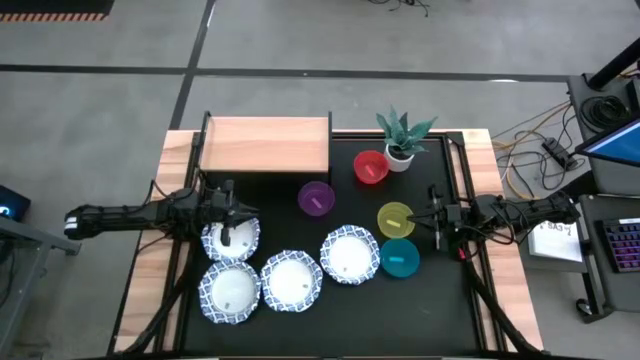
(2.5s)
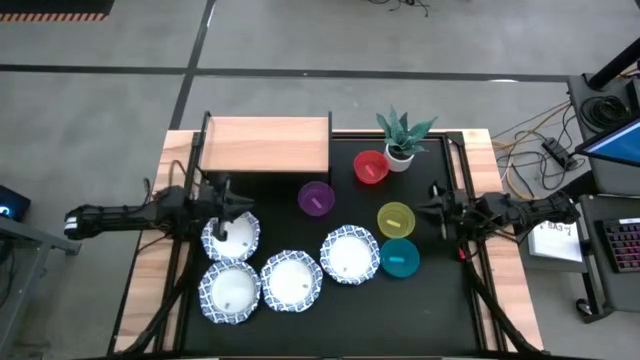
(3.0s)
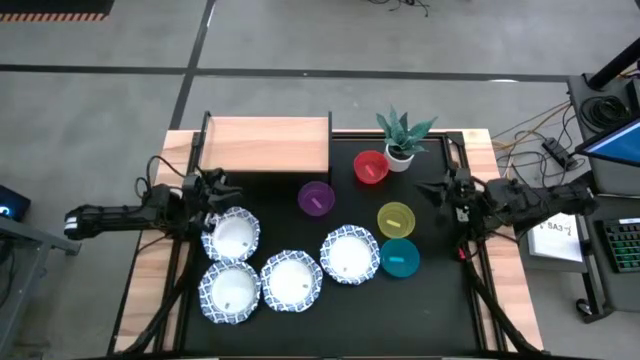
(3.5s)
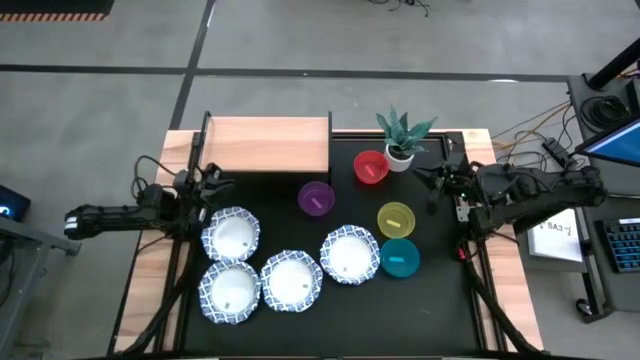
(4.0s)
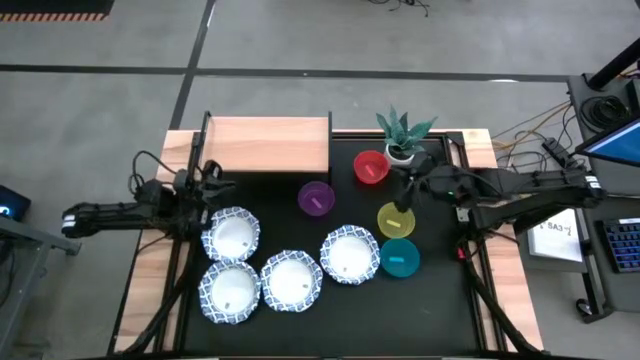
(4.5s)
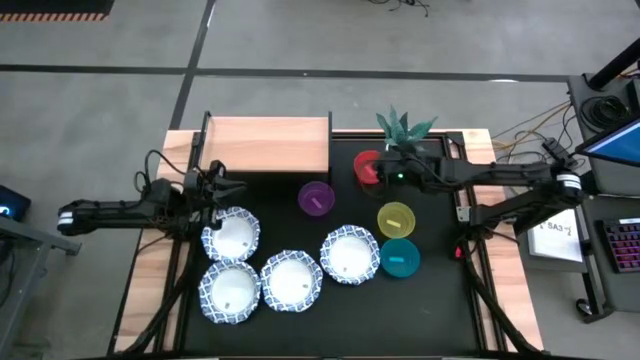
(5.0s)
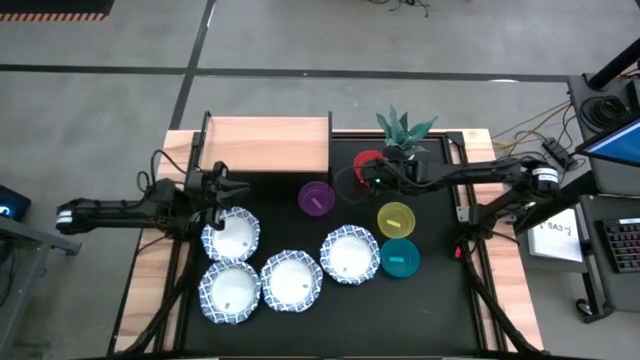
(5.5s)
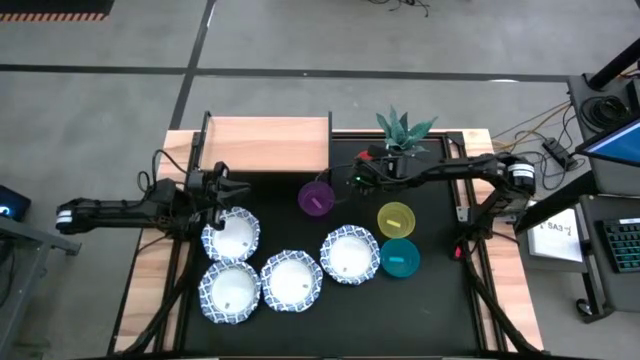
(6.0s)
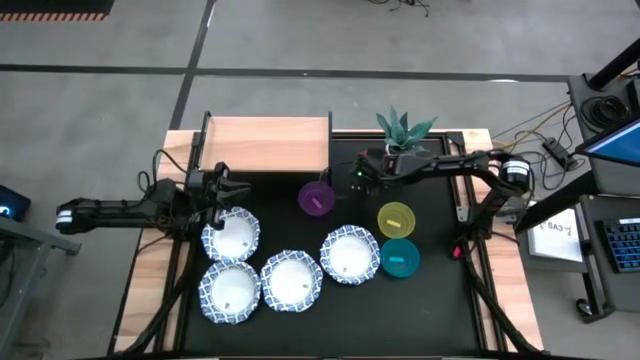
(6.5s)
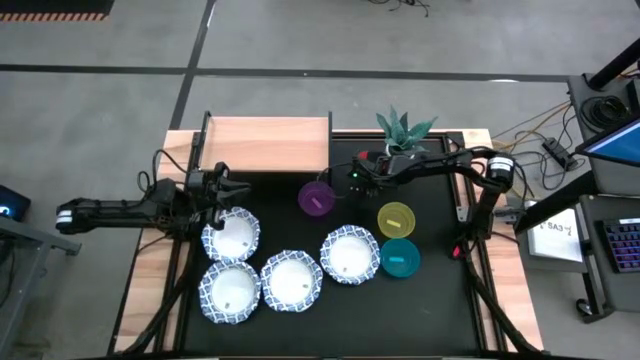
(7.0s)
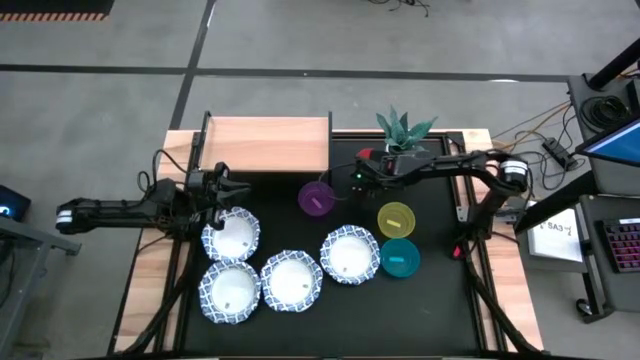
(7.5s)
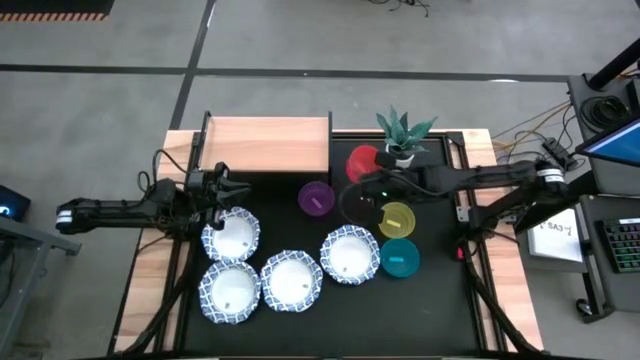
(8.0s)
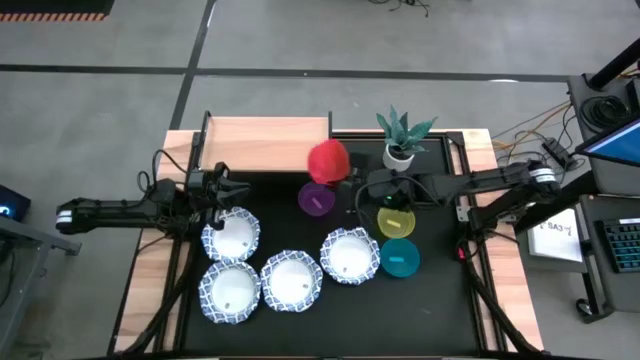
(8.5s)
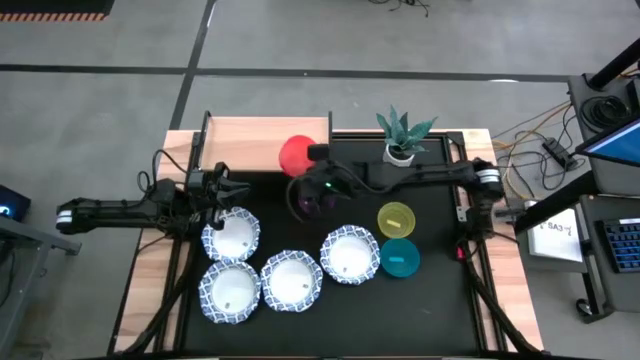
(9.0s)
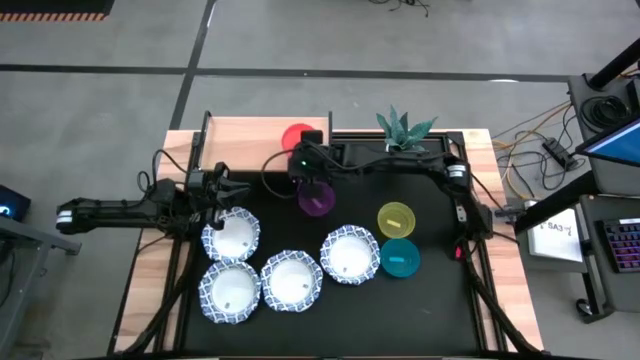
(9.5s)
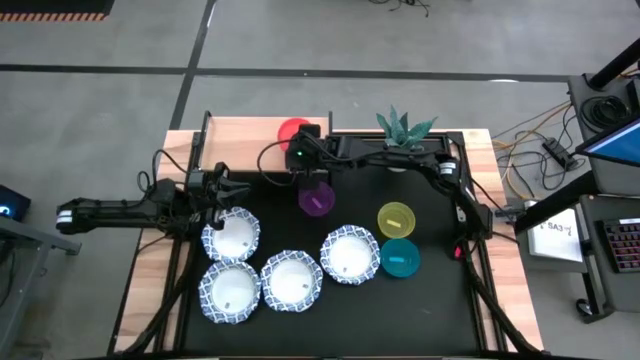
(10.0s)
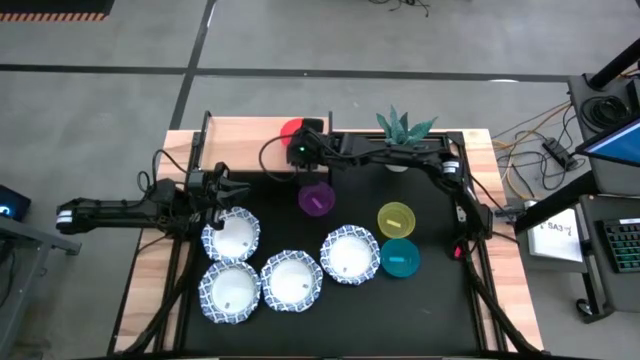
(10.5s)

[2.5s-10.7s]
Task: Place and stack bowls onto a shelf
Put the orange bowl on the shelf

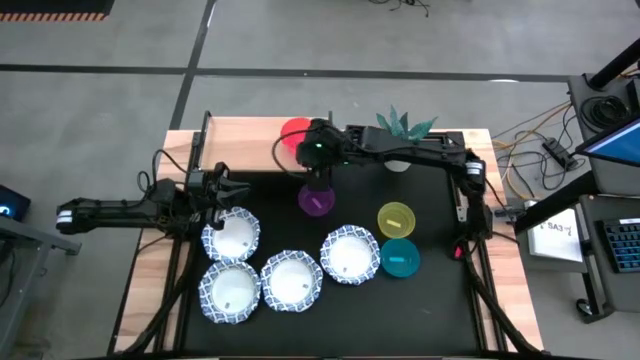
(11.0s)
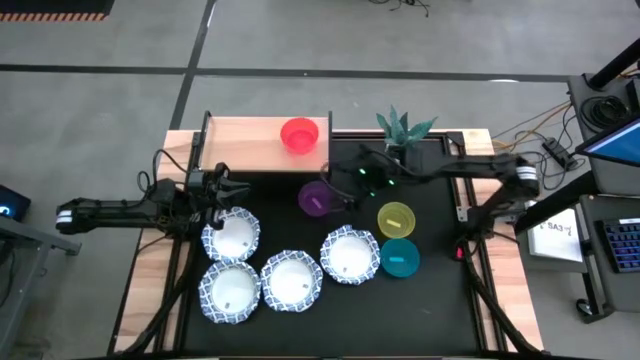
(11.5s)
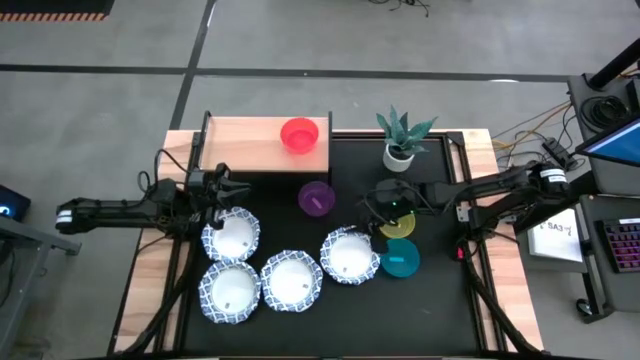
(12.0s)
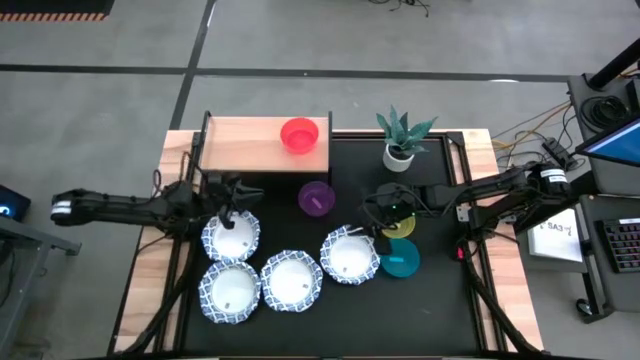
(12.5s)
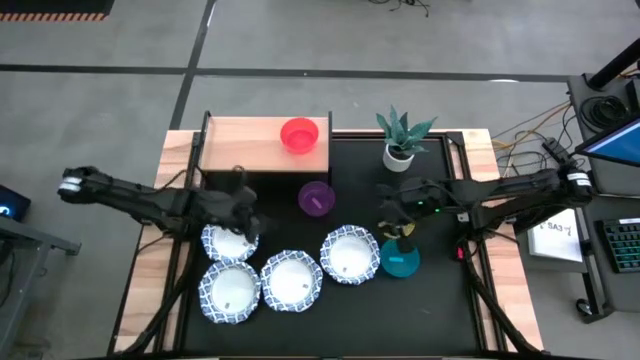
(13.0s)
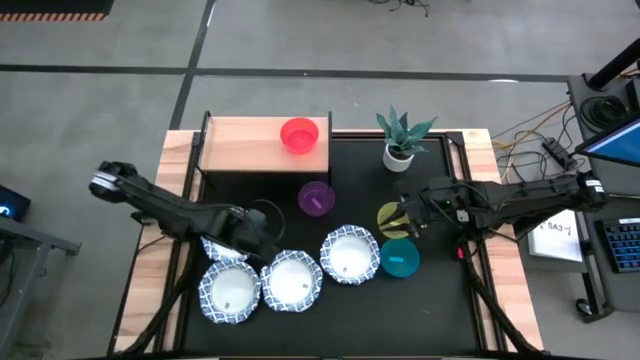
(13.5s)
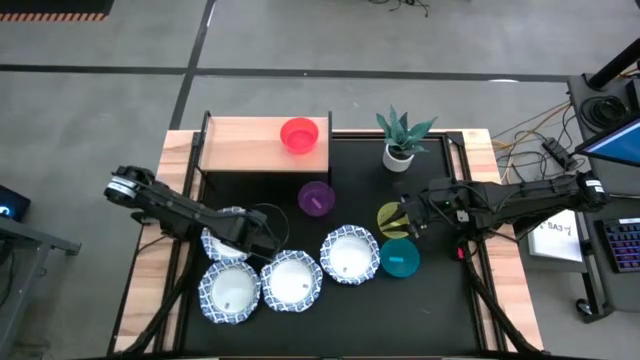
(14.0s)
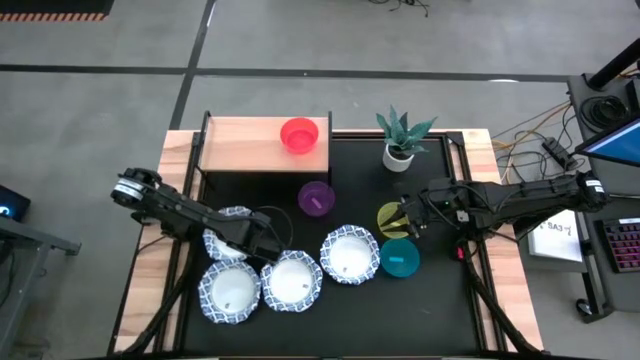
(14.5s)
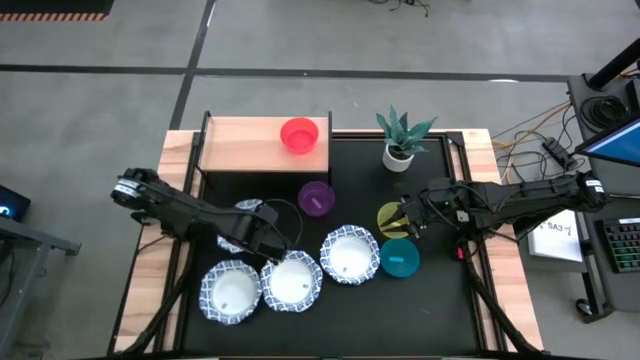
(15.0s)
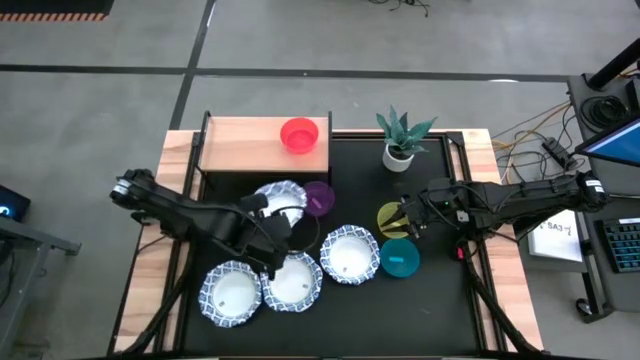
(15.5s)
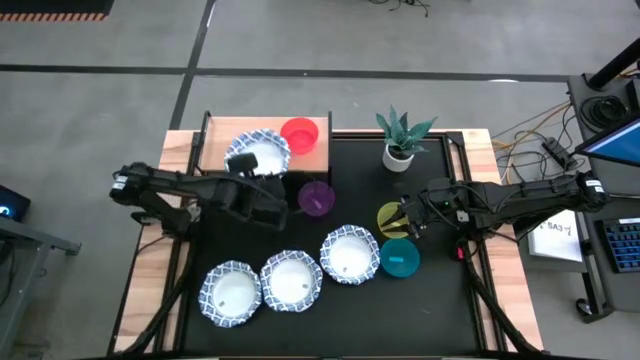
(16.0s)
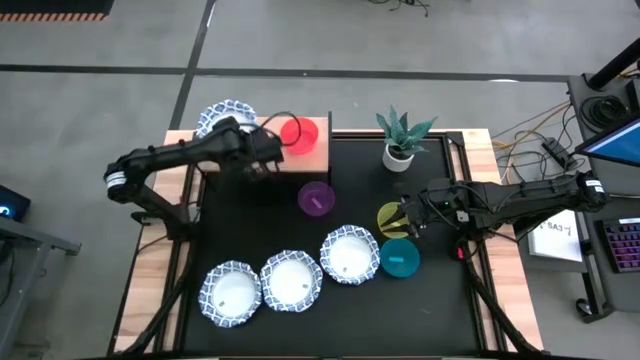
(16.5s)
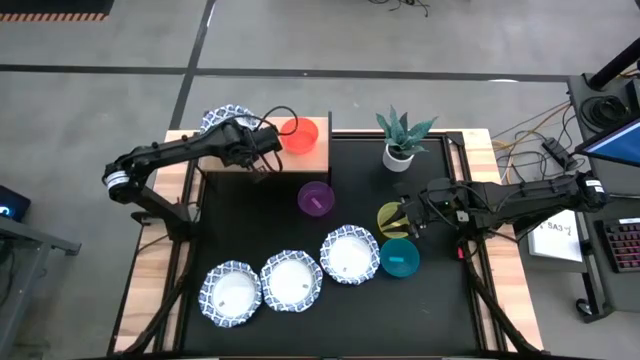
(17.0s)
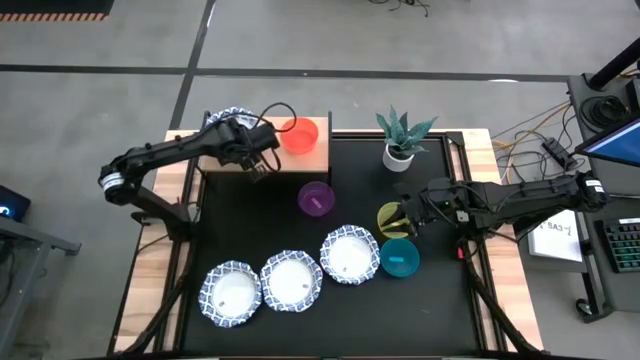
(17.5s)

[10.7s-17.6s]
Put the blue bowl on the shelf

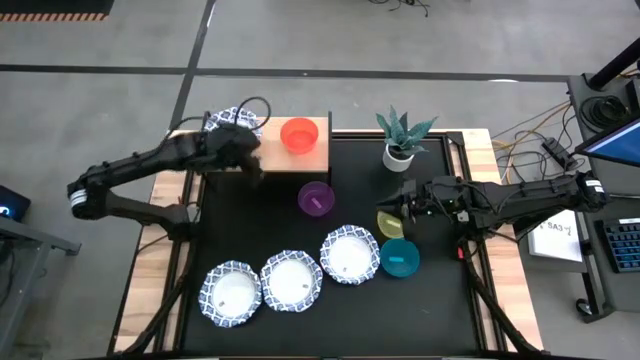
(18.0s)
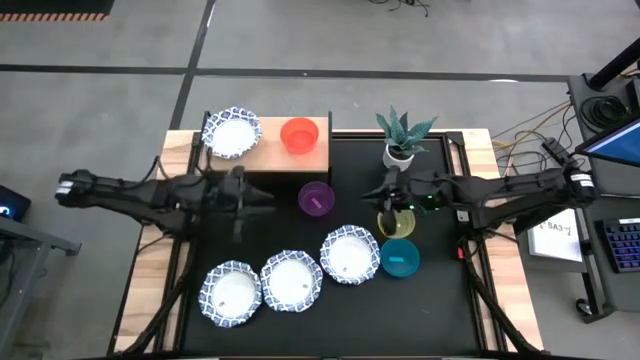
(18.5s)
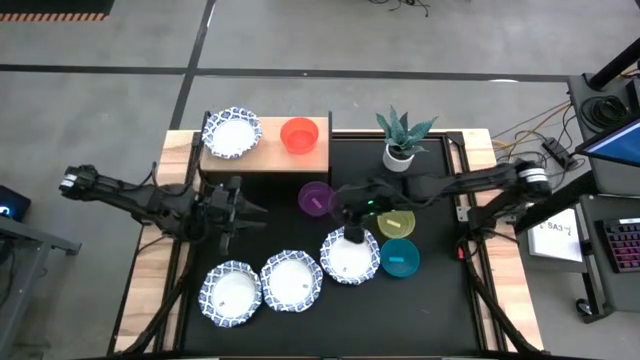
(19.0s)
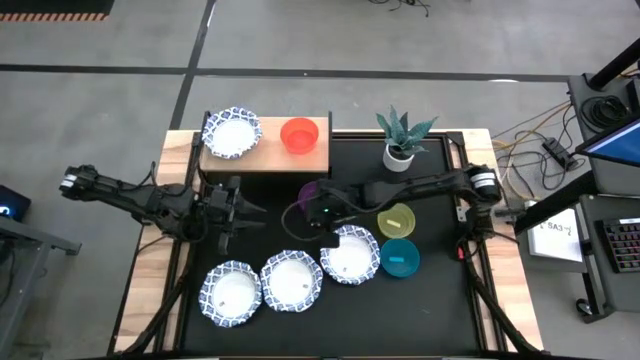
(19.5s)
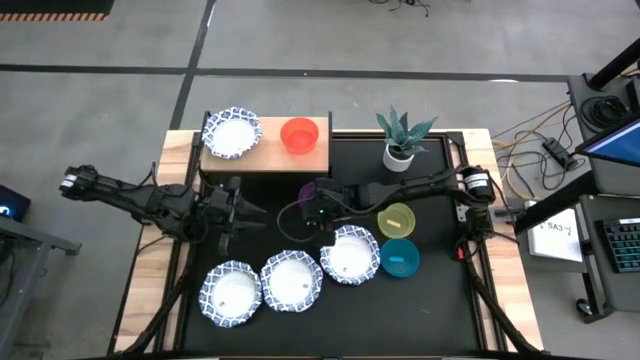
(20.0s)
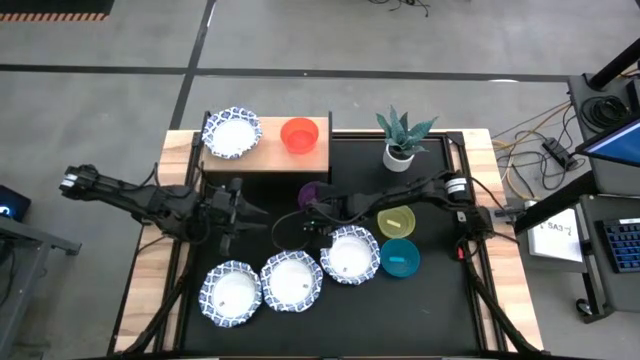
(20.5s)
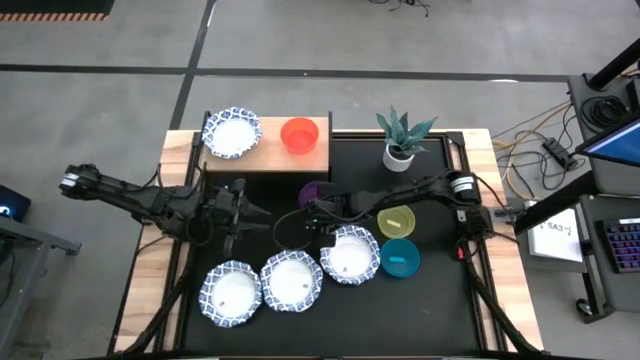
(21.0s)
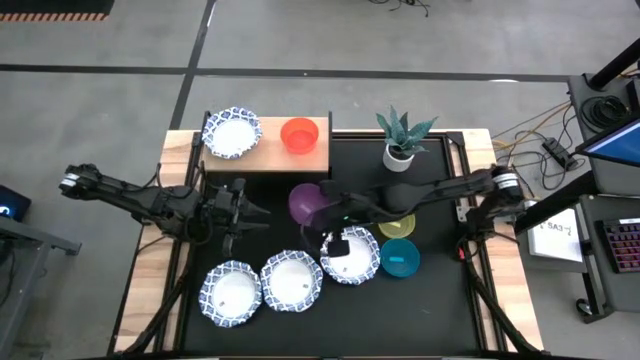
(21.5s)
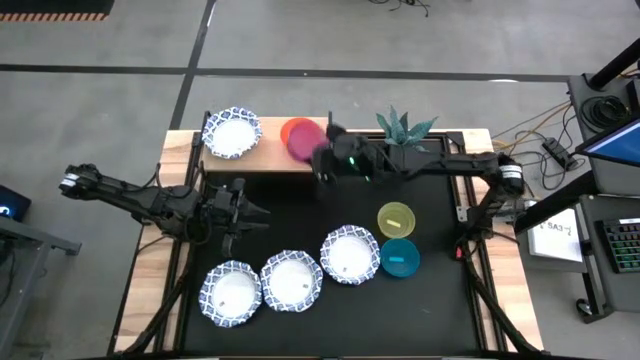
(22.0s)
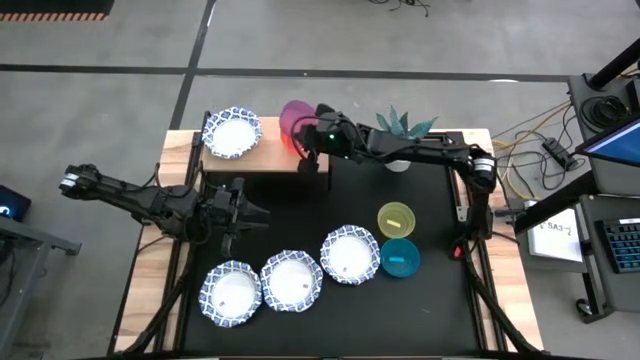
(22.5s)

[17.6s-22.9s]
Stack the purple bowl on top of the orange bowl on the shelf

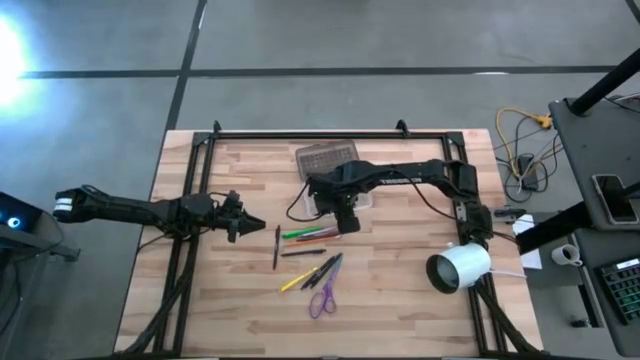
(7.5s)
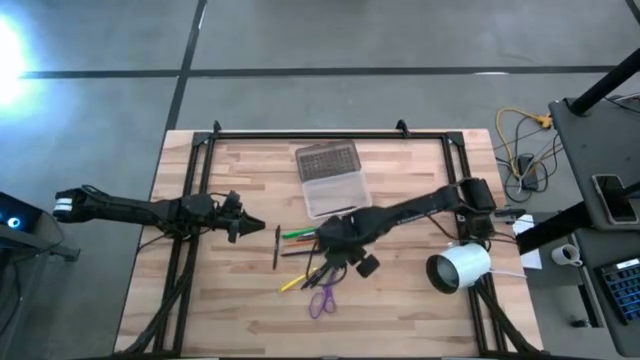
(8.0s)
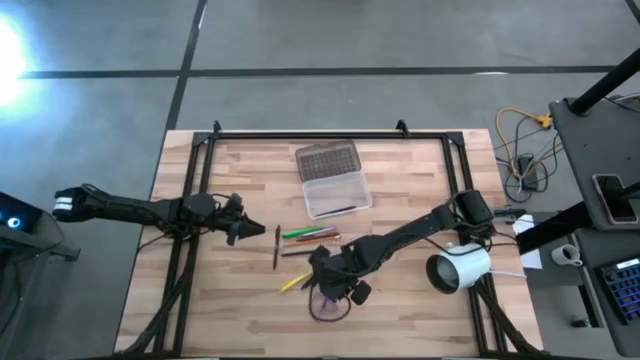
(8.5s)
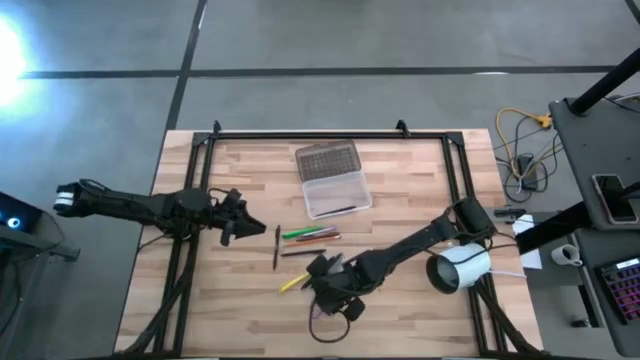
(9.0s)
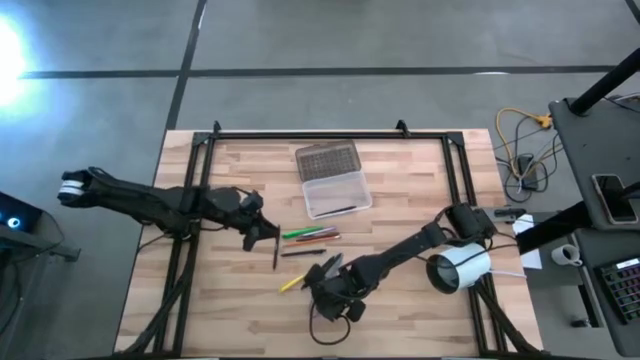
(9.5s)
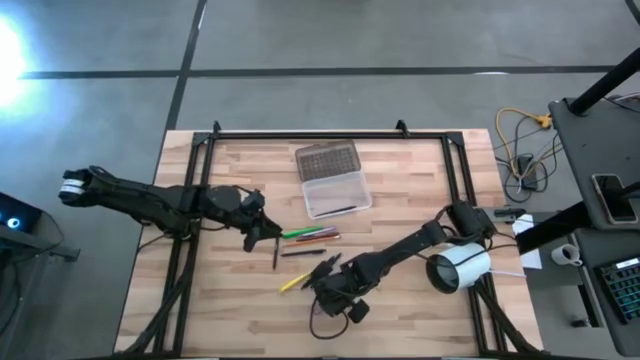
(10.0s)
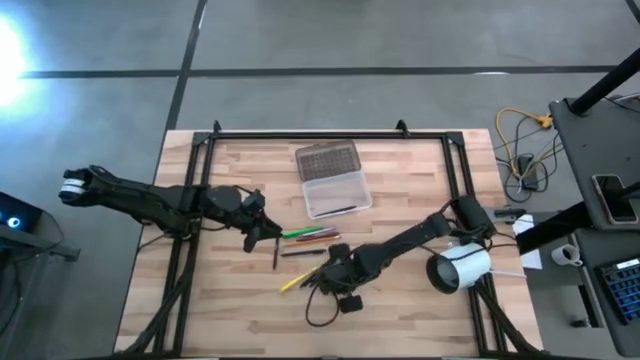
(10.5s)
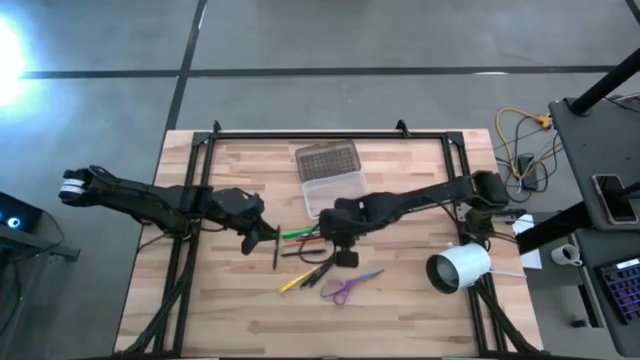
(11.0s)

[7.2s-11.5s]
Task: Pick & place school supplies into a supply box
Put the purple scissors into the black supply box
